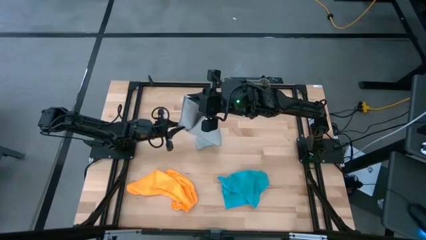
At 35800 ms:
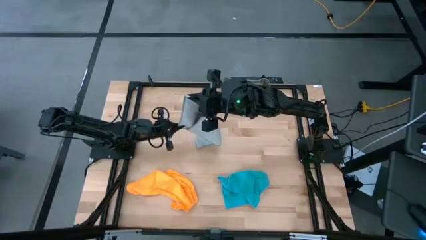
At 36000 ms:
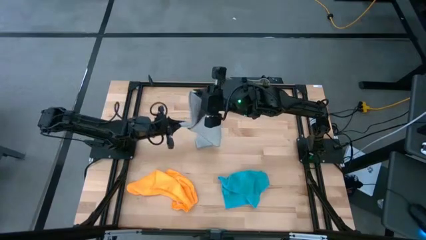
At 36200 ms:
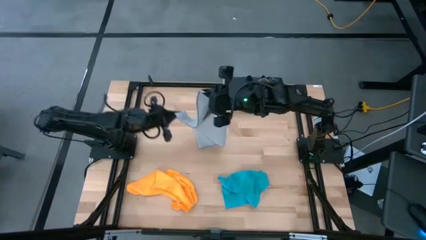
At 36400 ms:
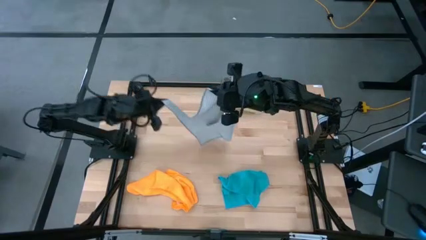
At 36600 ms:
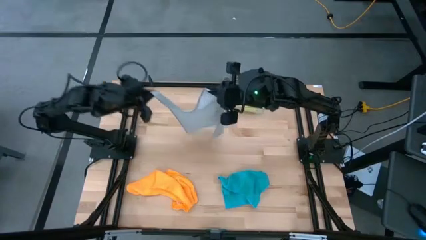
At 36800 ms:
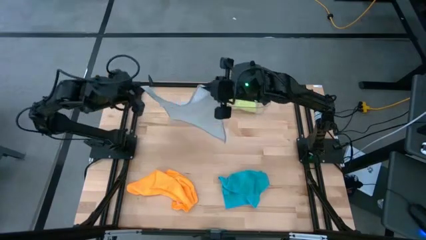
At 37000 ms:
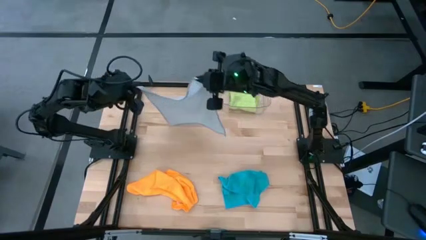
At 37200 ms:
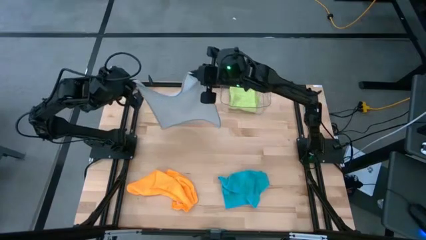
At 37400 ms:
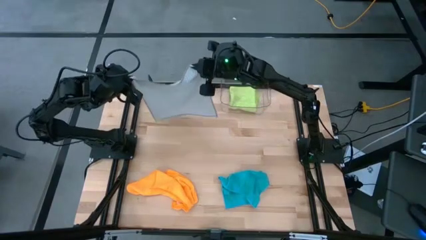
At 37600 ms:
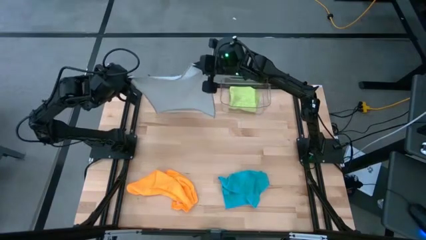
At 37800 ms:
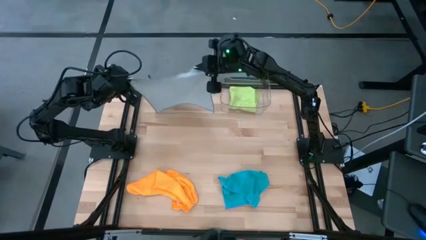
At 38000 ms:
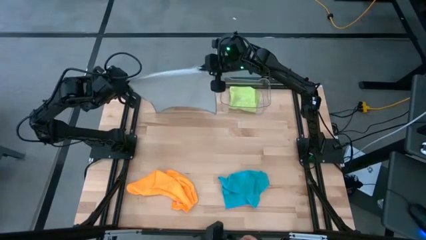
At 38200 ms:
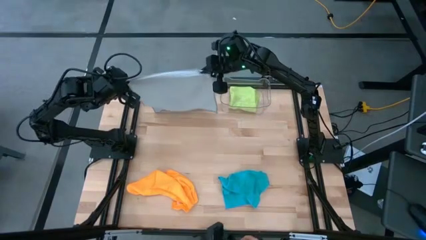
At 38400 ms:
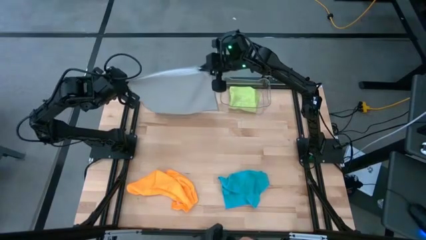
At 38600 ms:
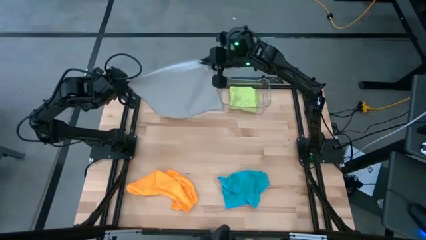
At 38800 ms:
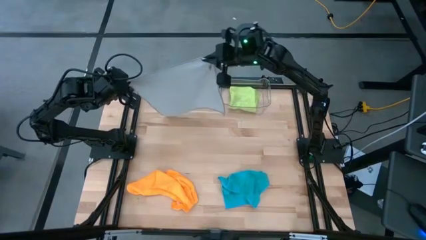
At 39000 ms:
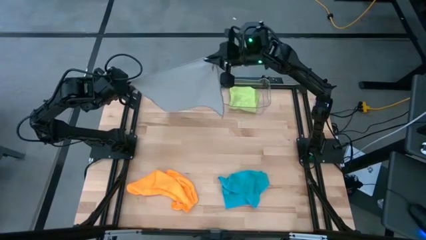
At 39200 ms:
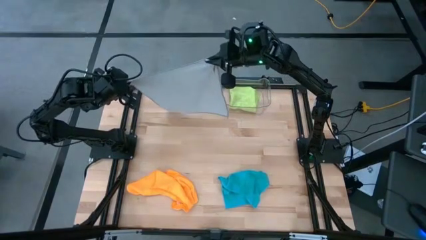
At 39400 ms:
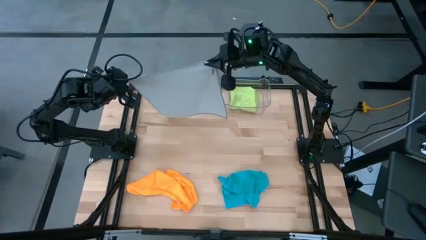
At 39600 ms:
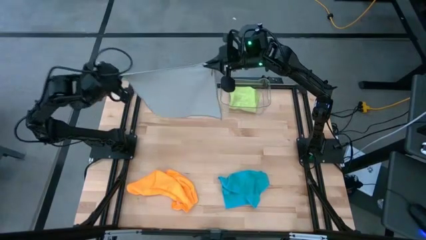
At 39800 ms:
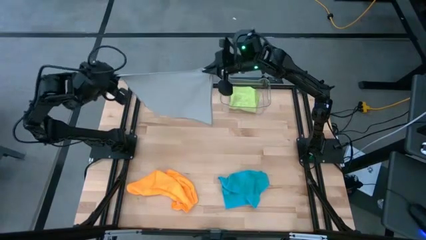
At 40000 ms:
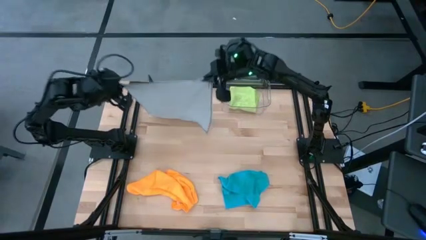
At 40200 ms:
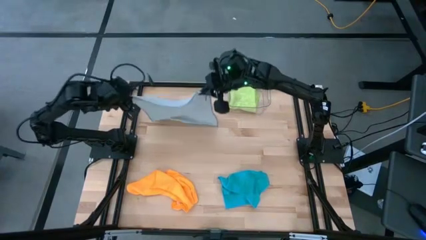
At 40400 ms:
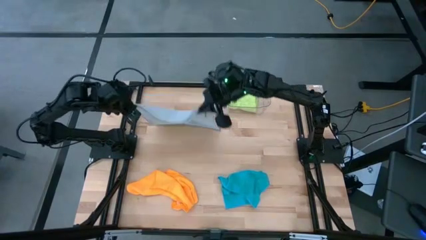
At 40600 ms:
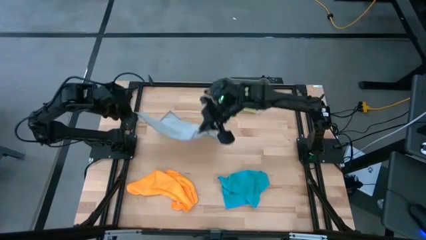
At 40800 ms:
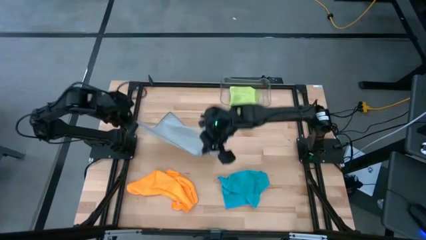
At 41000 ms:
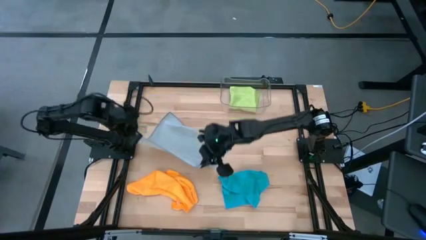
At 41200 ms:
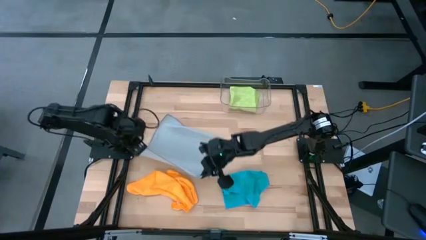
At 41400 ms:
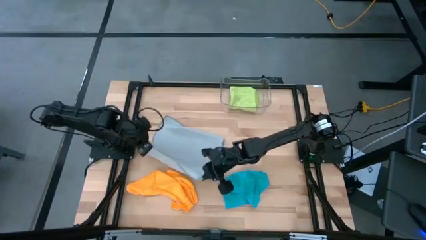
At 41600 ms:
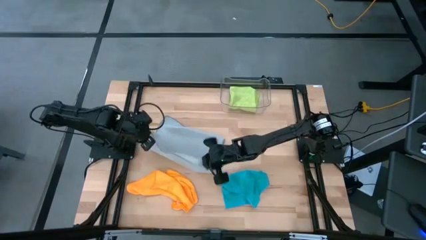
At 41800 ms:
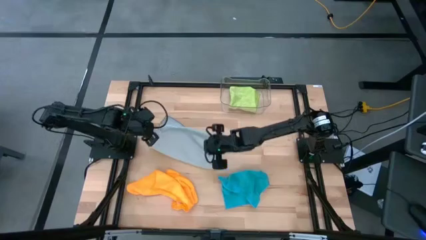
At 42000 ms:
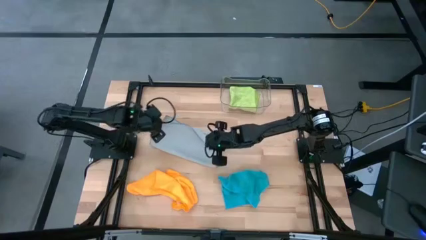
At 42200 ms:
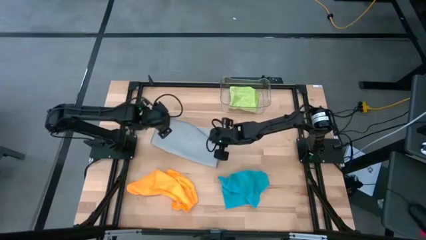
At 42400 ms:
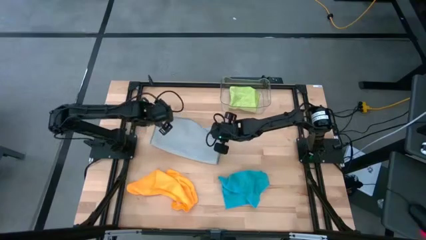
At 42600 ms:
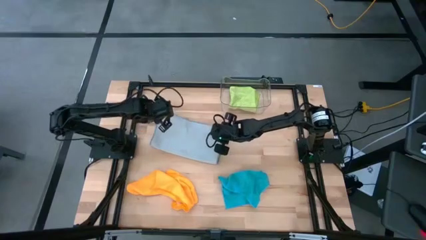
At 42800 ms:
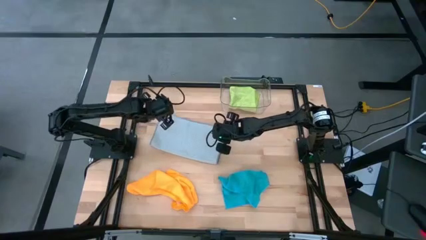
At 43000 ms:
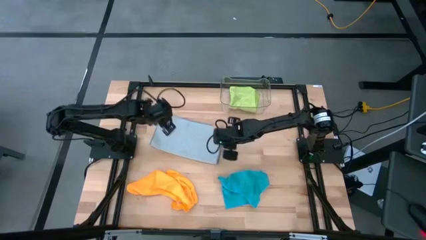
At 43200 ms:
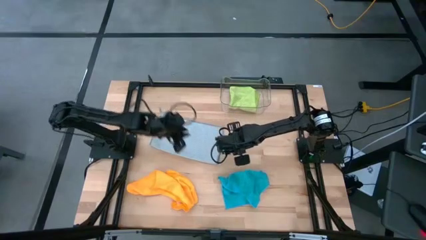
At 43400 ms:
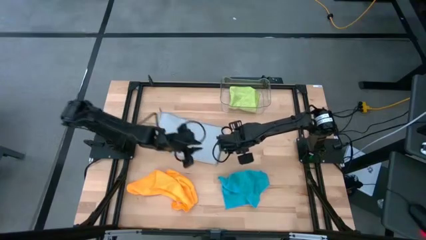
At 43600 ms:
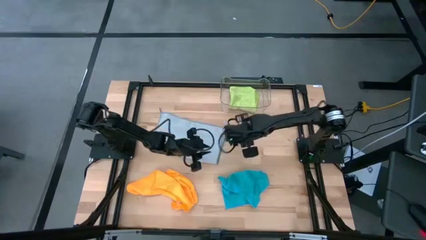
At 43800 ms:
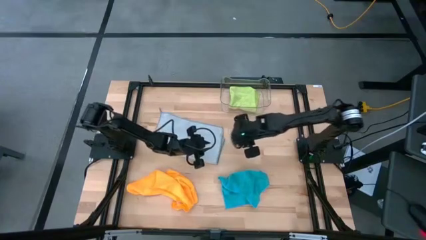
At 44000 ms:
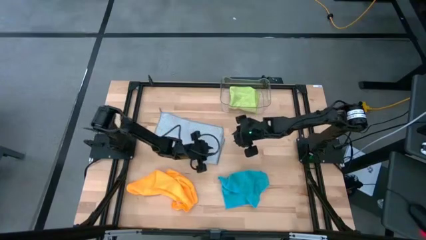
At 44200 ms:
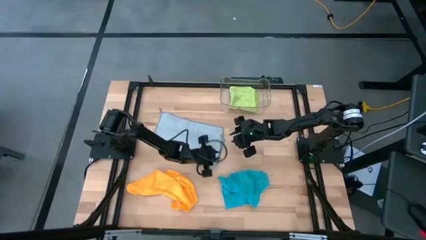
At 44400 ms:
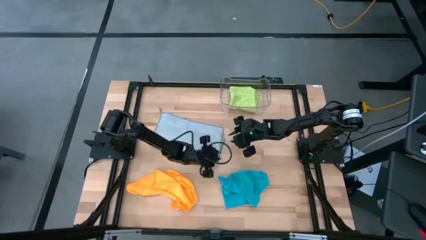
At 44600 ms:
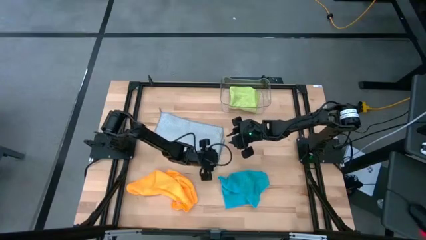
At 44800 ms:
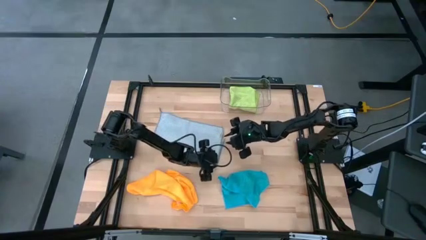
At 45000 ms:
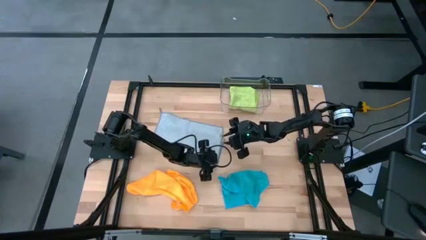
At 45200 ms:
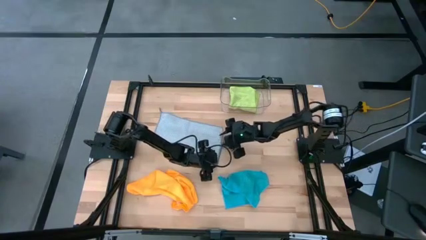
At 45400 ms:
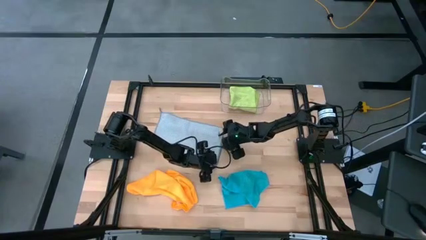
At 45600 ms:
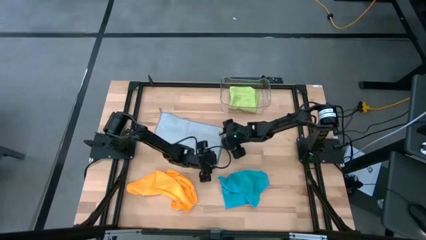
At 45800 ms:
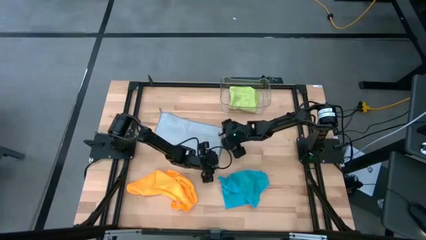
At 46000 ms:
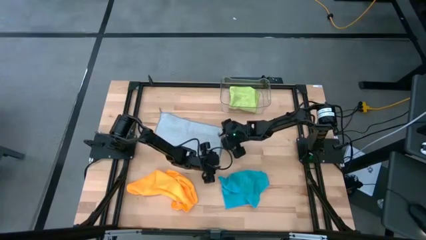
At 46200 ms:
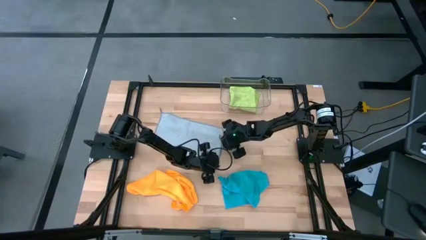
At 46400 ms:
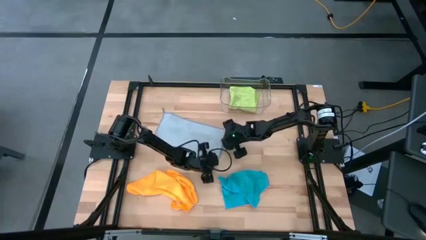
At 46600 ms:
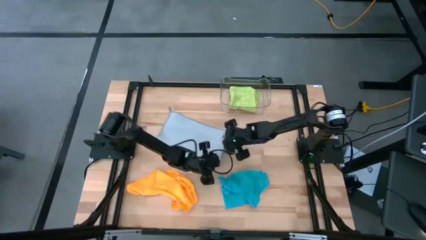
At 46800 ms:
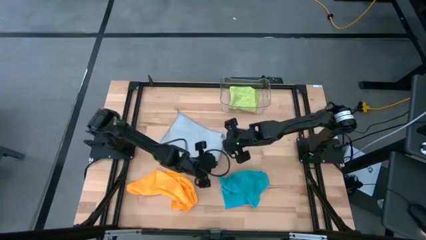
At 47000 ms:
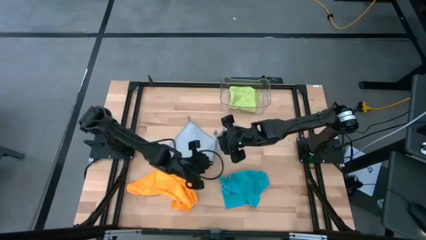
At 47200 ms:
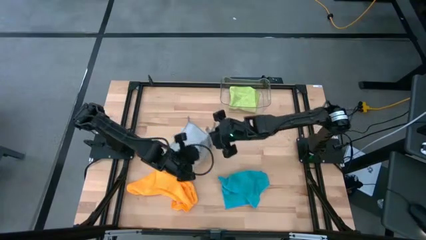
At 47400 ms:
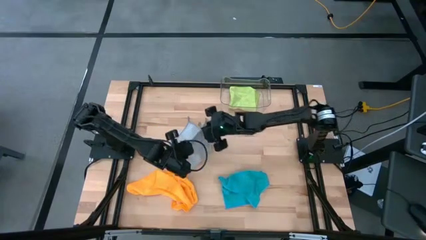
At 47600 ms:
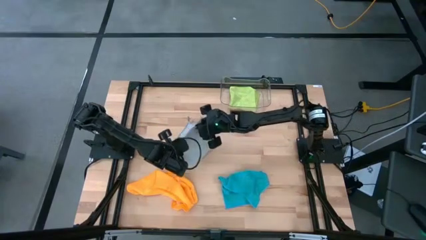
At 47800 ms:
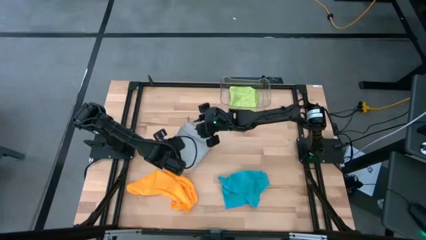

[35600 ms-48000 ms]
Task: Fold microfiber towels
Fold the gray microfiber towel

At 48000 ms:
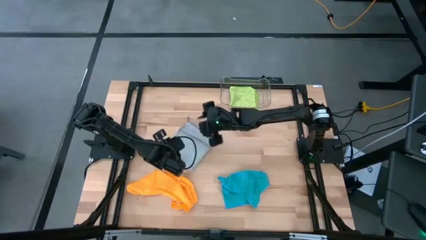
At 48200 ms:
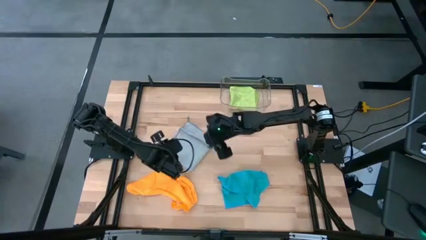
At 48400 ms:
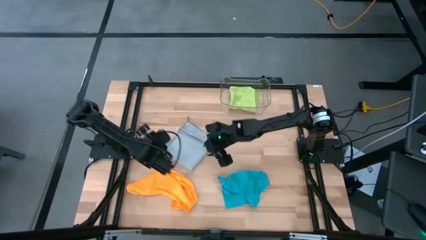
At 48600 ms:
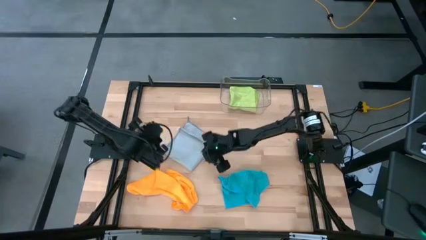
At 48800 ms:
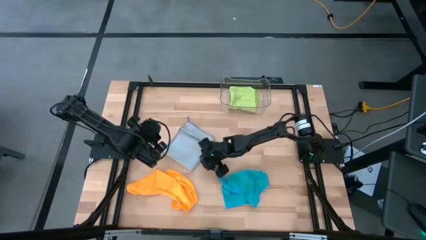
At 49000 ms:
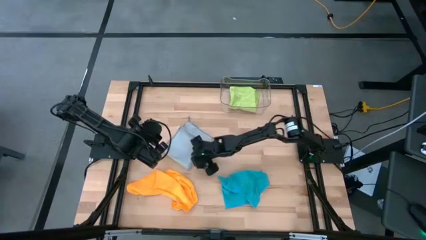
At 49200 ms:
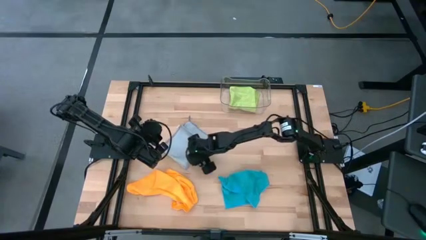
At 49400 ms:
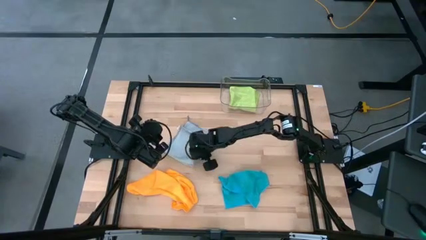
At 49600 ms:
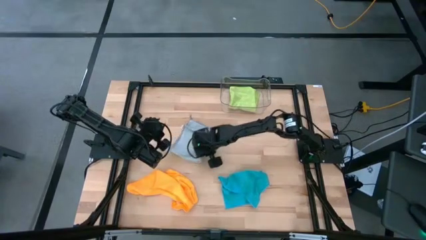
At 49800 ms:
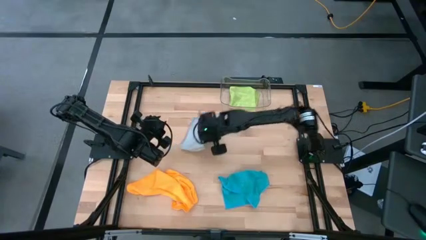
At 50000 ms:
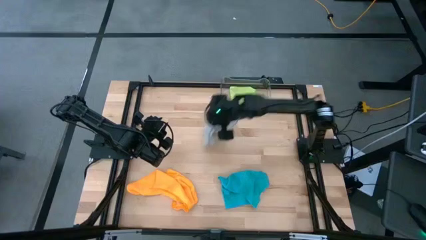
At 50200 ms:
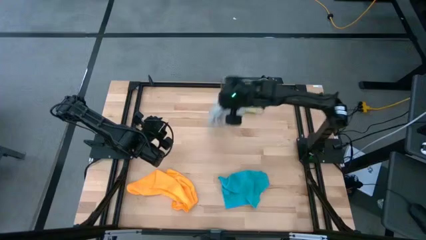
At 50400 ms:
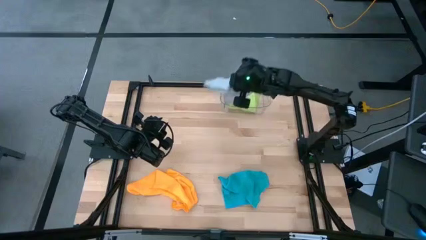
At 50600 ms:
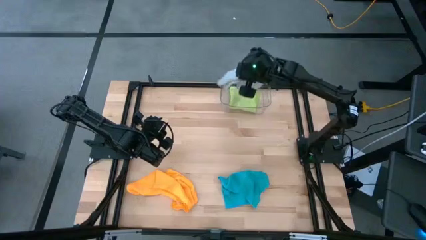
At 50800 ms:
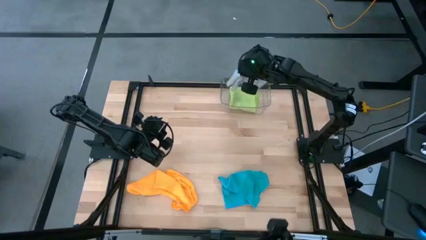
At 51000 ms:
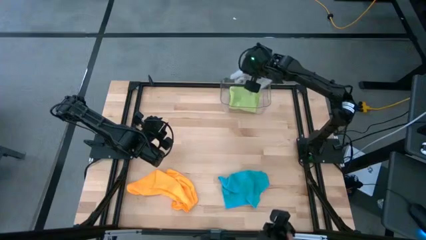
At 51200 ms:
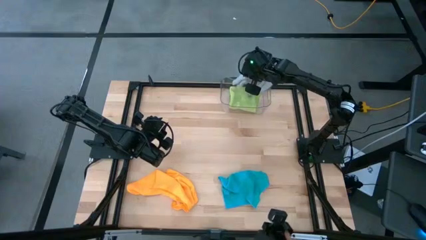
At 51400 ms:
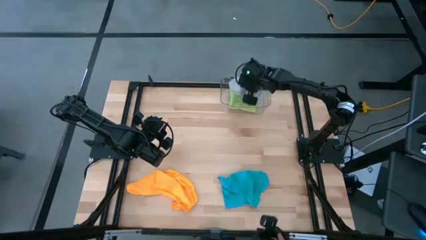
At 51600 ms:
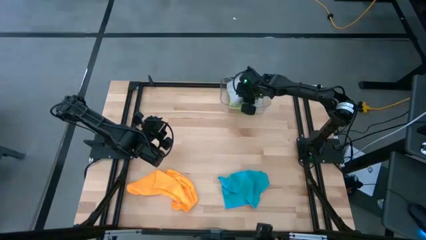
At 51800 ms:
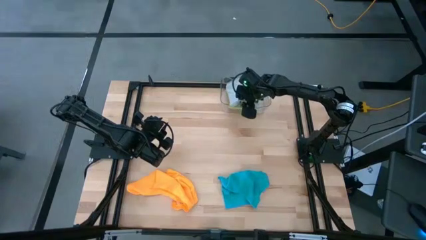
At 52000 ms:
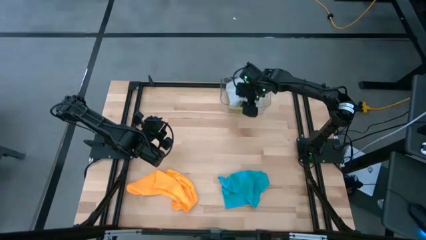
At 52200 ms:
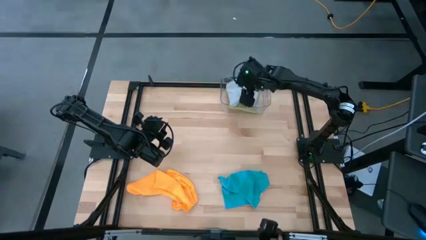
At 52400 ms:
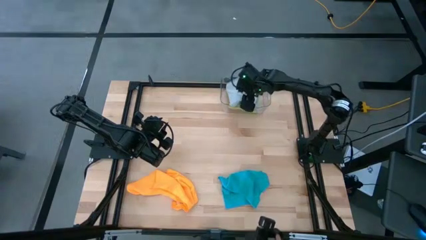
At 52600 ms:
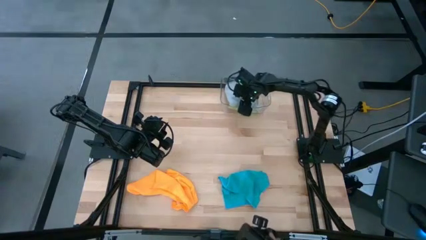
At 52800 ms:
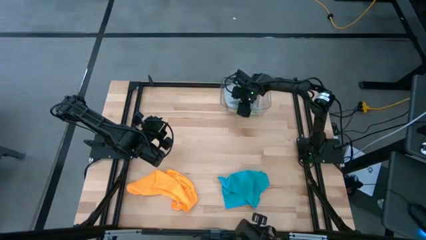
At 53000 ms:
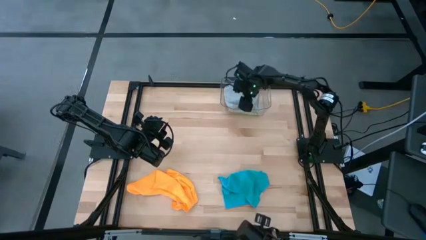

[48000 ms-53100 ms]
Put the gray microfiber towel into the transparent bin
